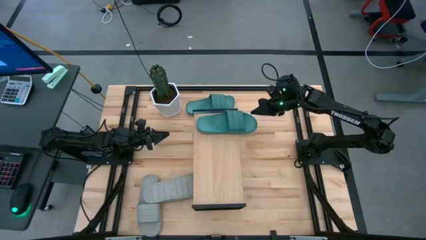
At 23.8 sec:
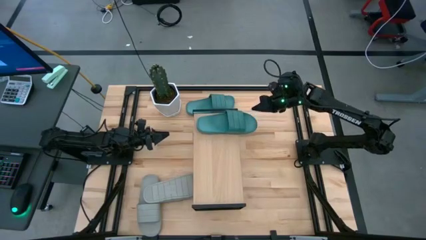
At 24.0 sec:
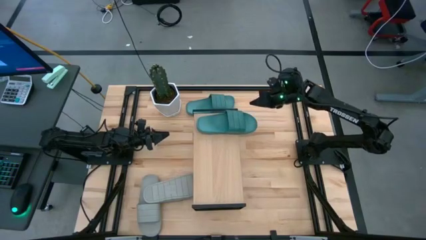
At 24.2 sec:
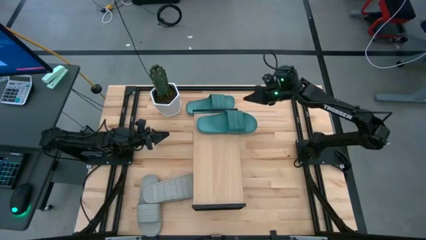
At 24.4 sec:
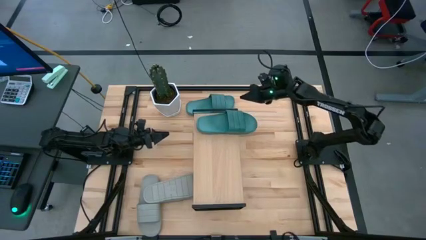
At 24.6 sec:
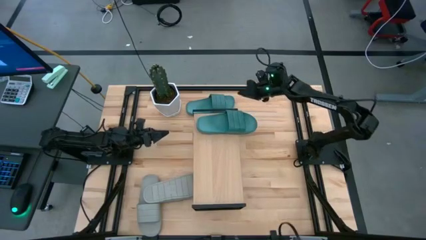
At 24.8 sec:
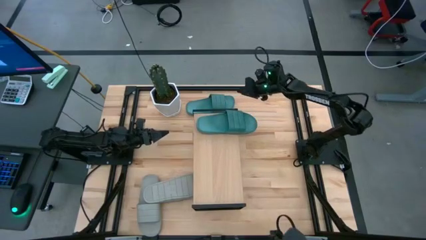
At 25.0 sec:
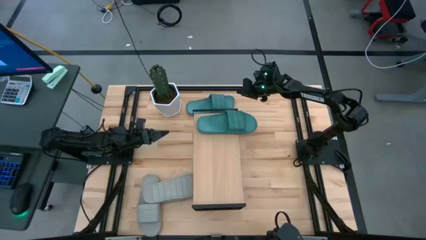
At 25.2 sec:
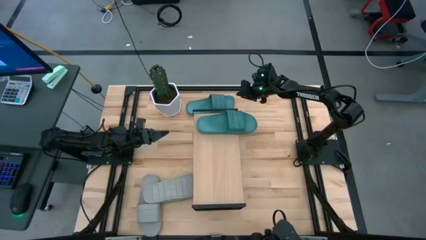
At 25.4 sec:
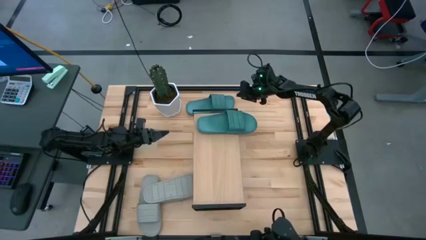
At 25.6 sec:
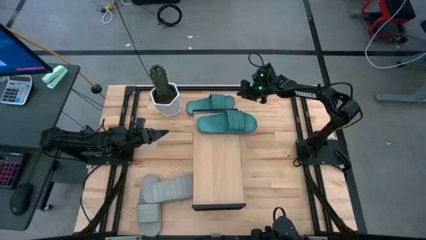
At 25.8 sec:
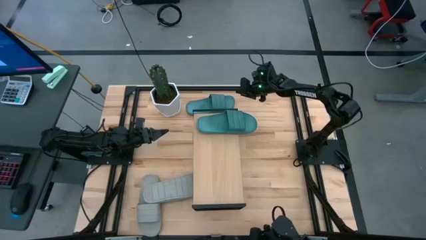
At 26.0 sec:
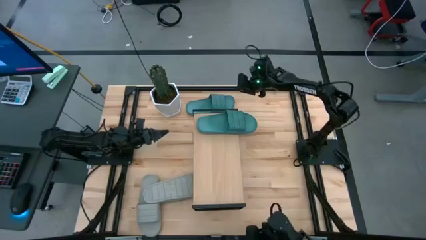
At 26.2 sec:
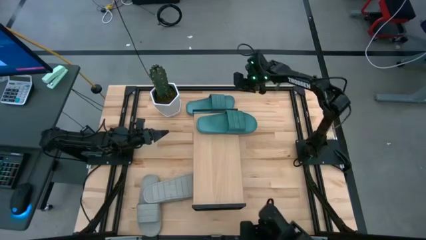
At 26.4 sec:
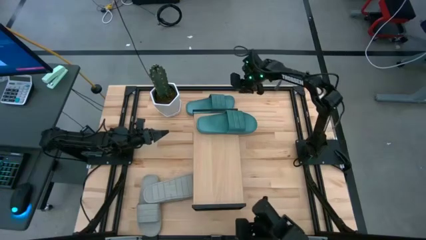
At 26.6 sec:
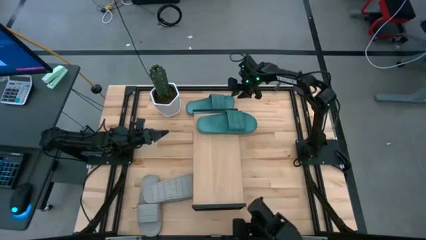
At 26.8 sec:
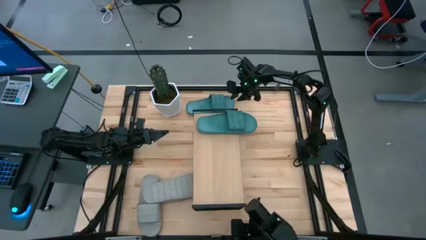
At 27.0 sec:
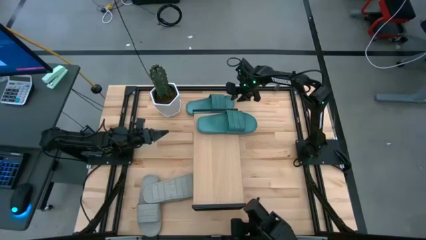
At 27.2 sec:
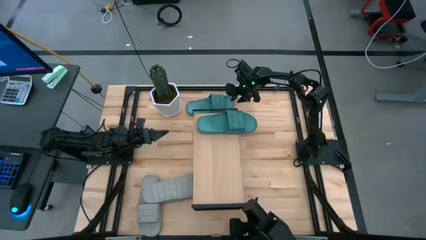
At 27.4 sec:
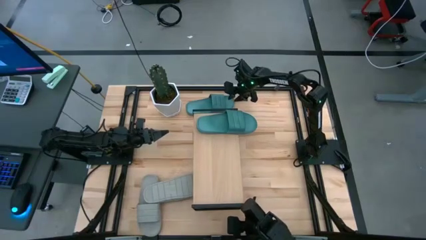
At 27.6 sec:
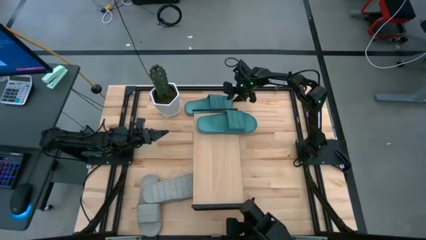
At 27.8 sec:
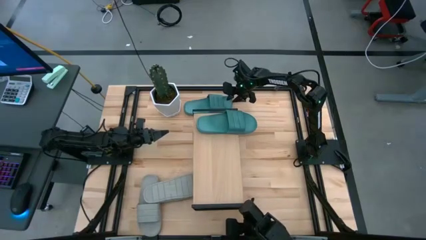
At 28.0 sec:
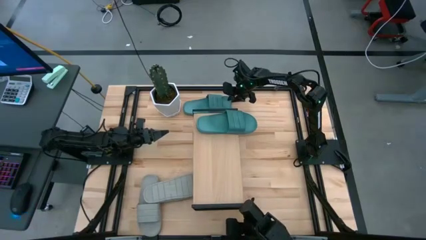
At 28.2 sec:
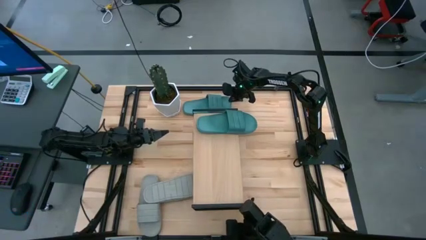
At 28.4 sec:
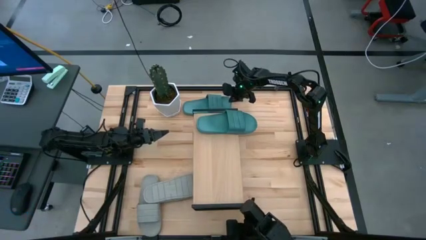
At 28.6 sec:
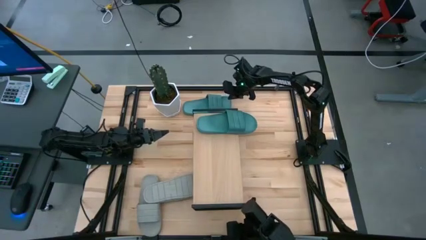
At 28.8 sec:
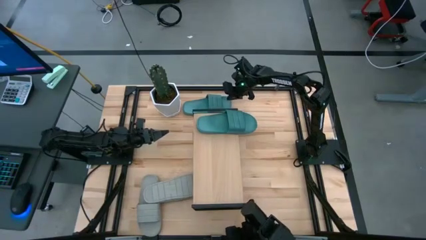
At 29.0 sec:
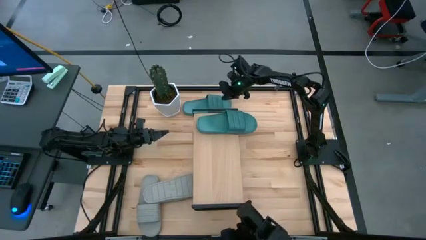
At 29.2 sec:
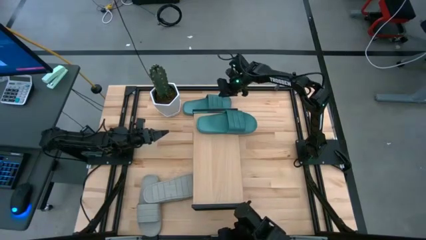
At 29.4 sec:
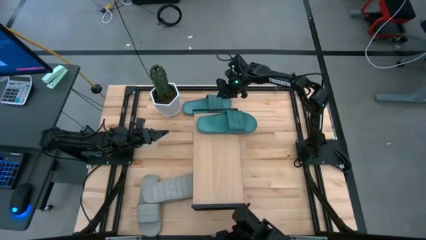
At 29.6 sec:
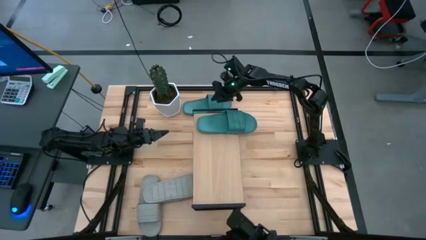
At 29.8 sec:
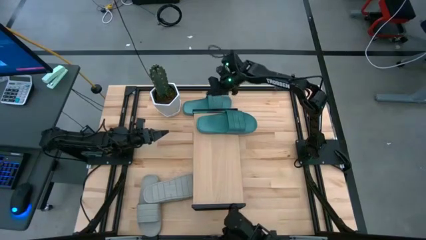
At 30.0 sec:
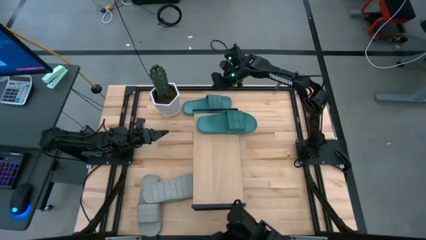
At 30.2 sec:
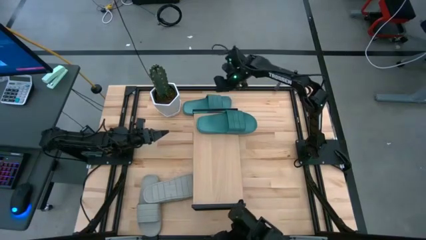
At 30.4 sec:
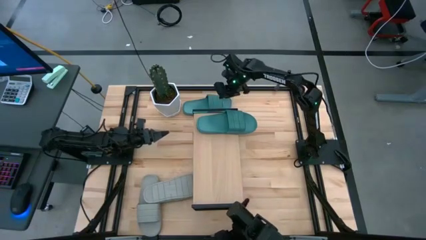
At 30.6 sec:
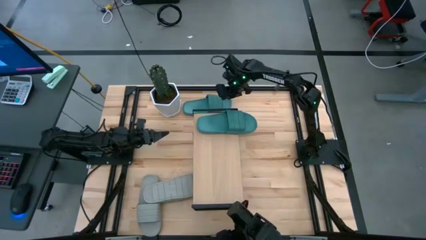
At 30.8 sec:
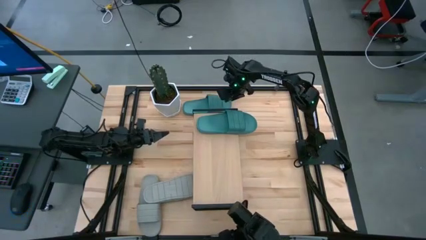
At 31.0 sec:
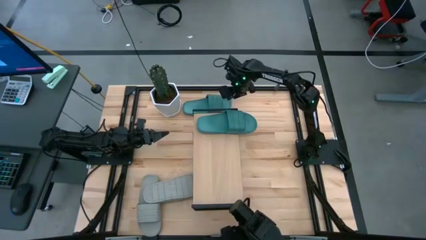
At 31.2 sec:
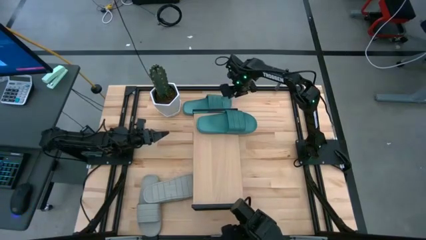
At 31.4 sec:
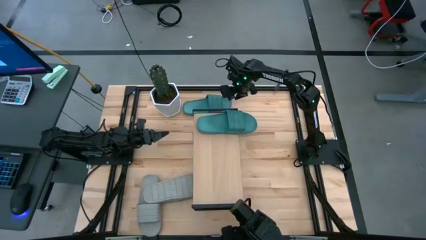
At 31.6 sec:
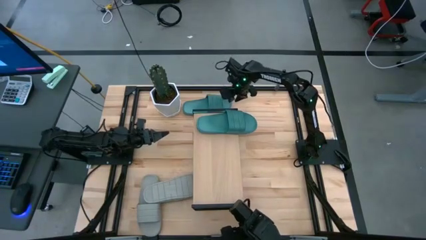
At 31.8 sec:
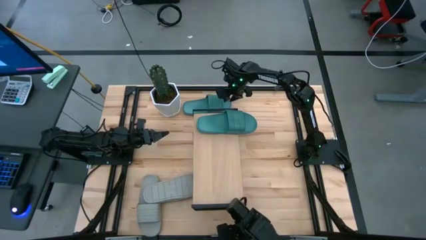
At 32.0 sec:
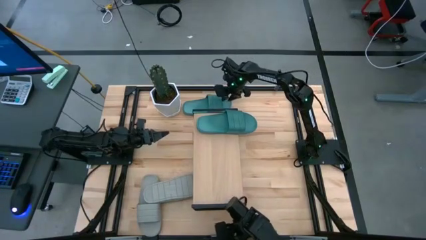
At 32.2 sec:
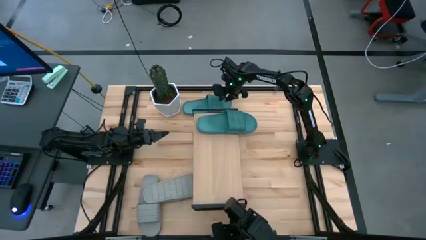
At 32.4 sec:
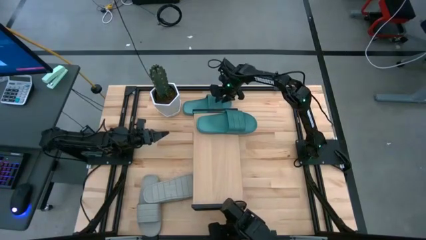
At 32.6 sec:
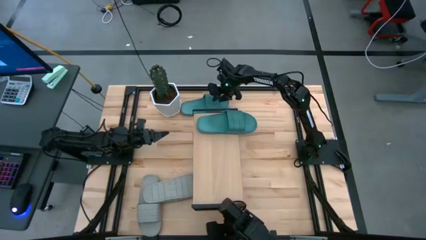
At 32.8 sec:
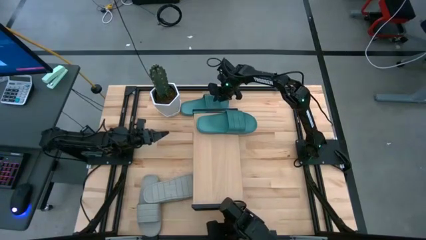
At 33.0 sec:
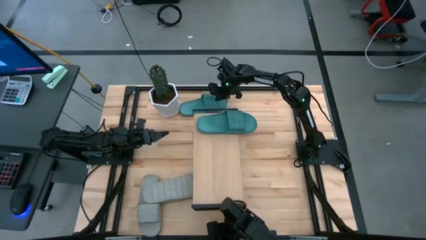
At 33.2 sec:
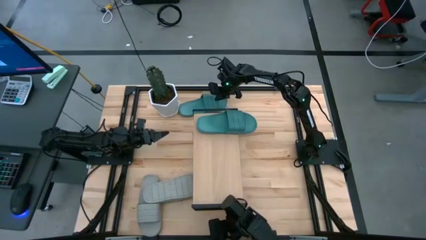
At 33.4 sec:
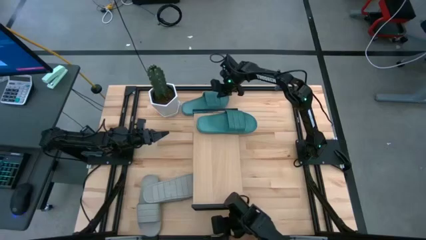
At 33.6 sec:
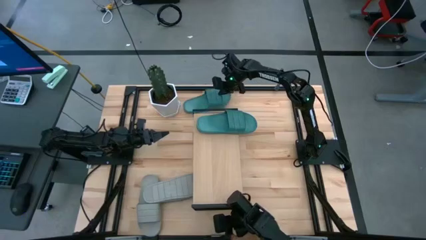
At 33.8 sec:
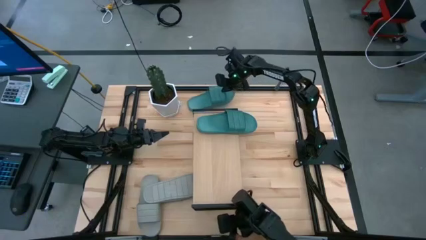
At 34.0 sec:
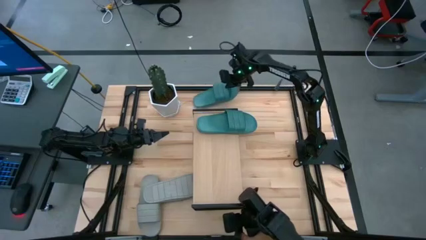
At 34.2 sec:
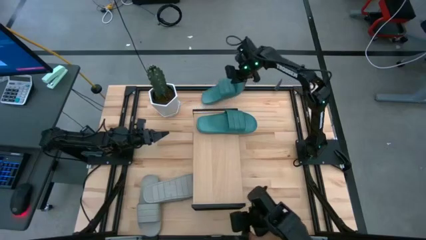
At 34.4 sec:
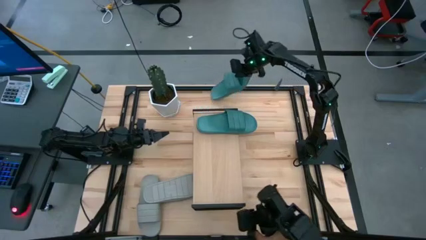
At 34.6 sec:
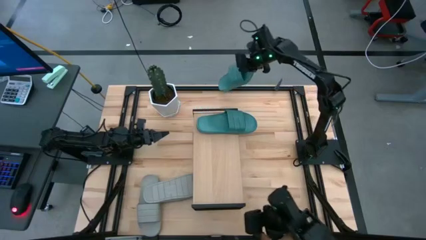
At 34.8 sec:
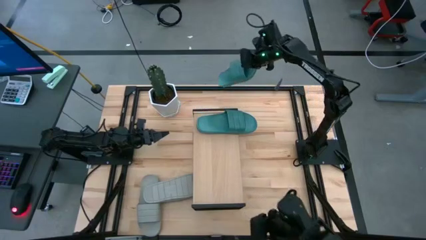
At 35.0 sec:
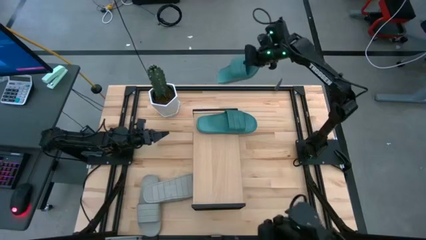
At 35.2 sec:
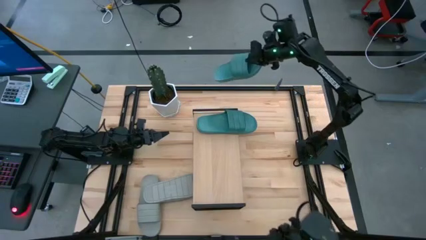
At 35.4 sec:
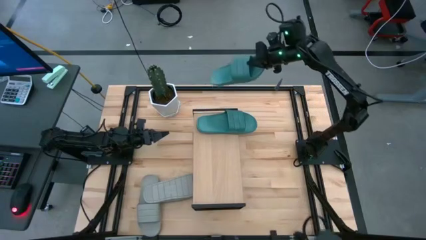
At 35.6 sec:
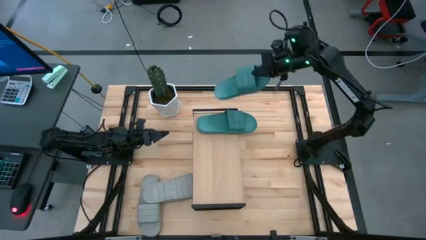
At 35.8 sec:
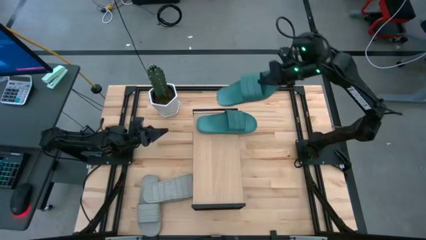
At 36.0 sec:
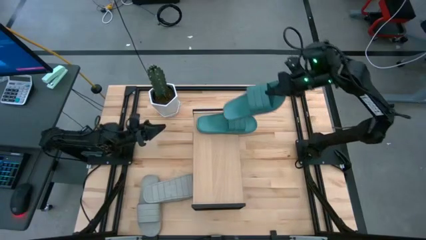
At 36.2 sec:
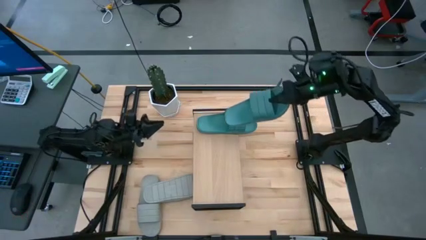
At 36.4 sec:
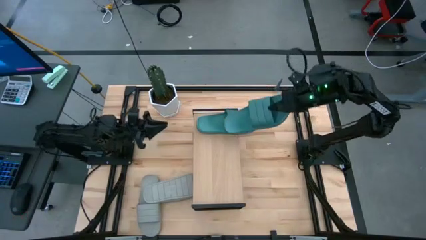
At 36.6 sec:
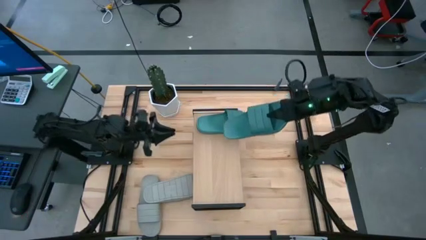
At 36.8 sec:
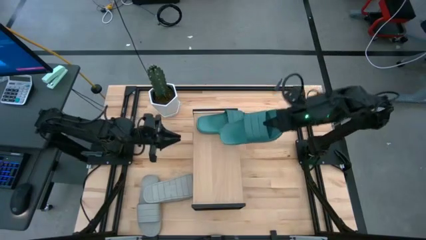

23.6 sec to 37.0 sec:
Task: Pick and place slides into the shelf
Put the green slide on the shelf
